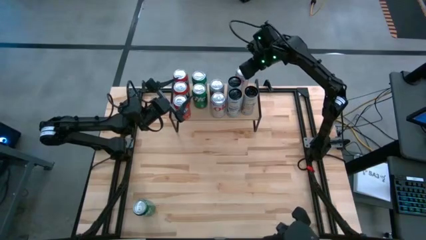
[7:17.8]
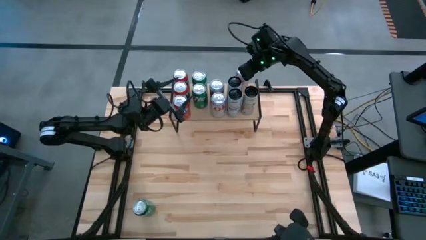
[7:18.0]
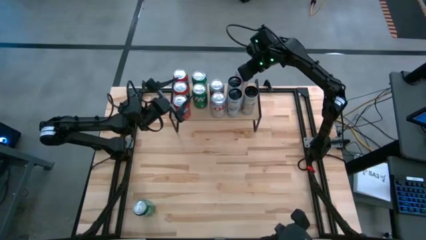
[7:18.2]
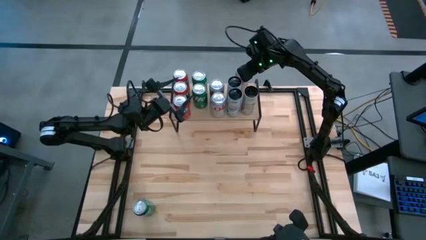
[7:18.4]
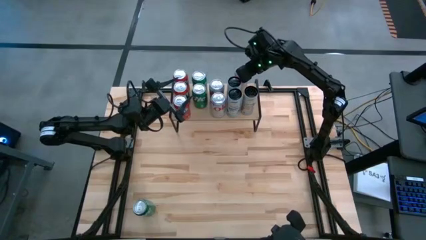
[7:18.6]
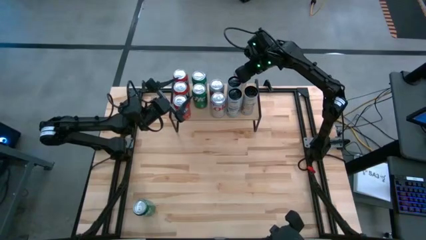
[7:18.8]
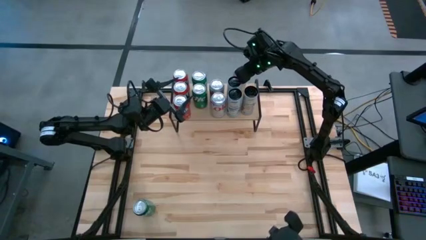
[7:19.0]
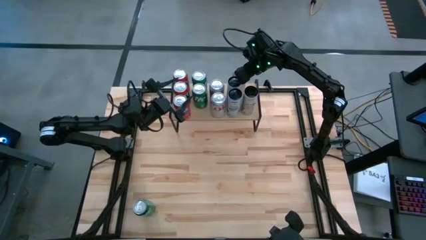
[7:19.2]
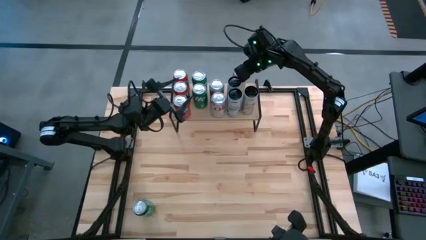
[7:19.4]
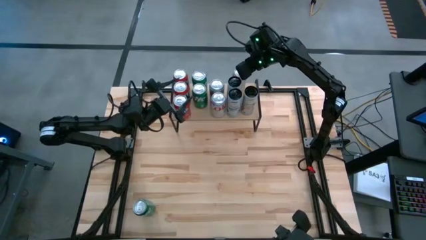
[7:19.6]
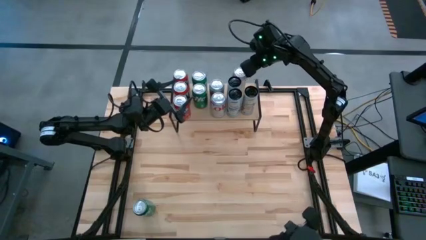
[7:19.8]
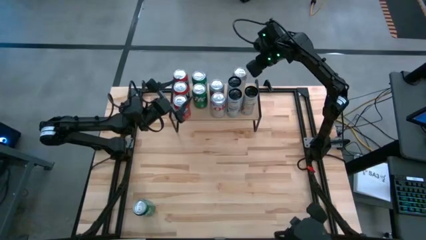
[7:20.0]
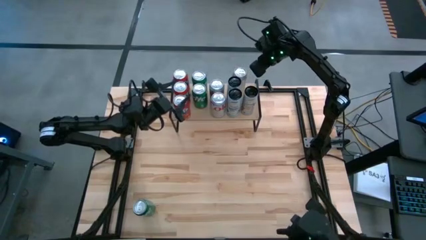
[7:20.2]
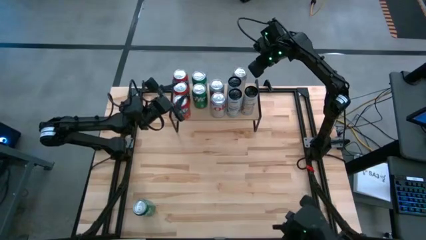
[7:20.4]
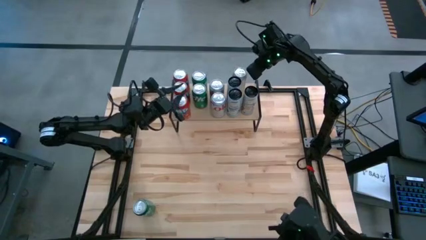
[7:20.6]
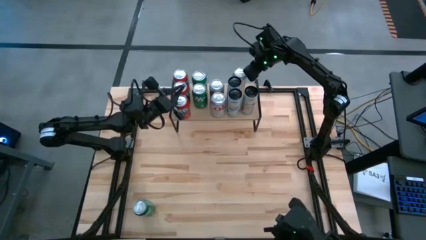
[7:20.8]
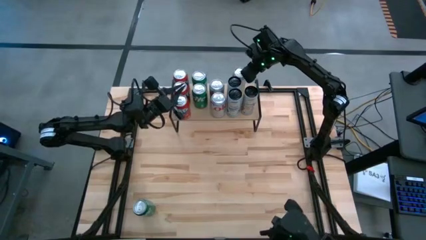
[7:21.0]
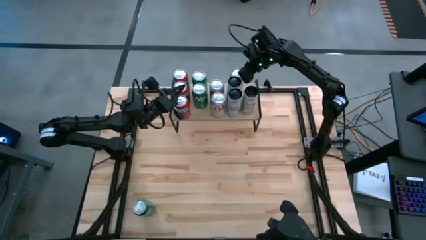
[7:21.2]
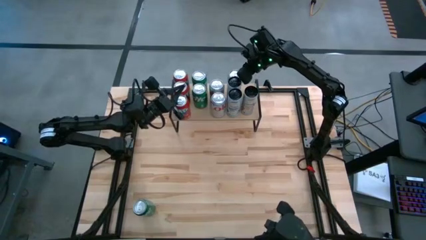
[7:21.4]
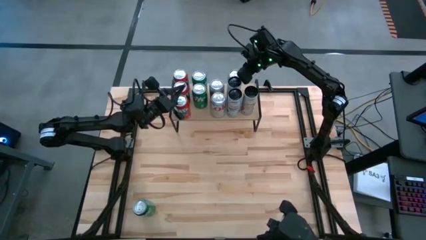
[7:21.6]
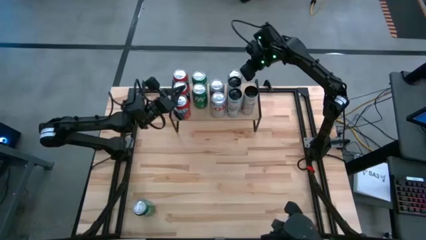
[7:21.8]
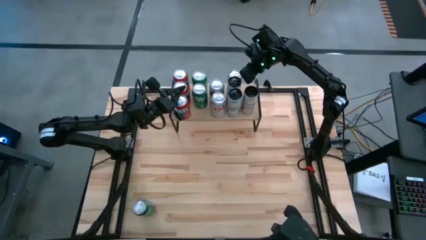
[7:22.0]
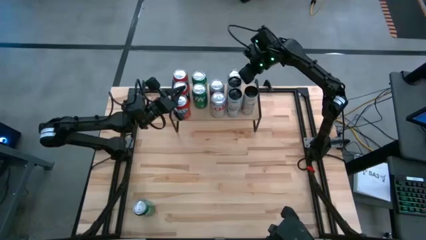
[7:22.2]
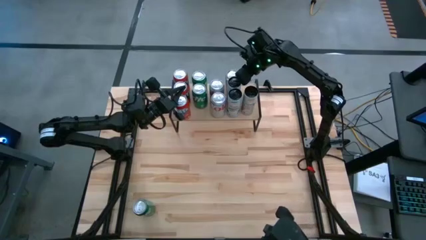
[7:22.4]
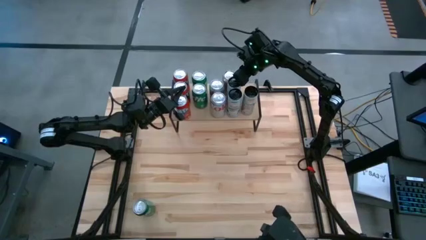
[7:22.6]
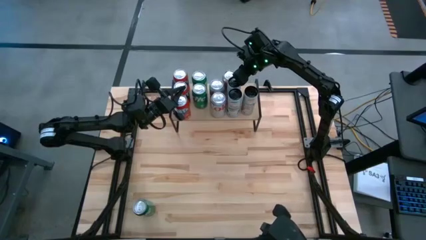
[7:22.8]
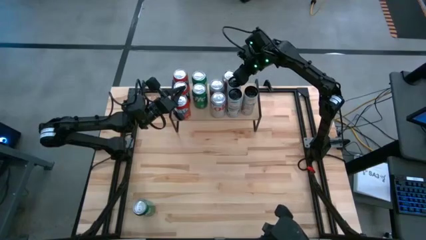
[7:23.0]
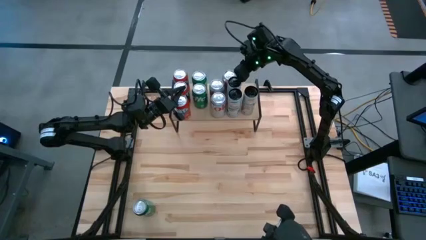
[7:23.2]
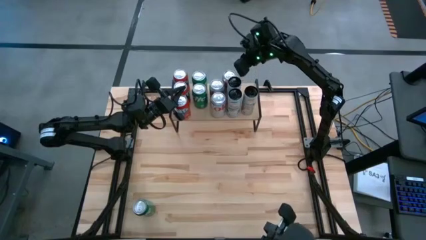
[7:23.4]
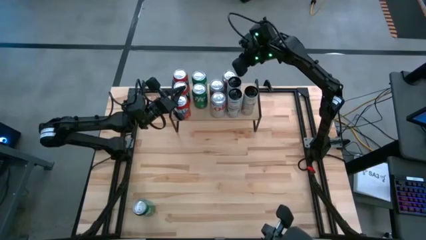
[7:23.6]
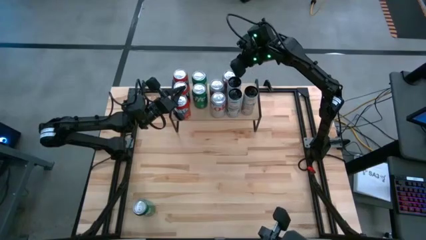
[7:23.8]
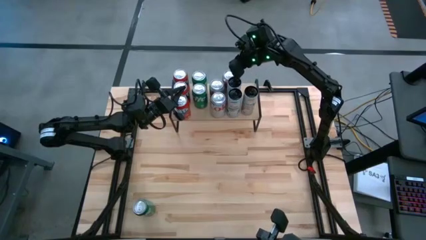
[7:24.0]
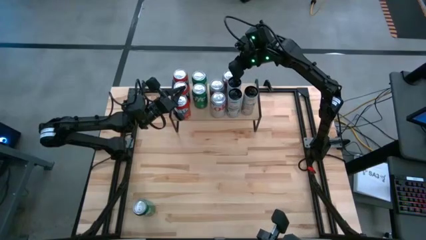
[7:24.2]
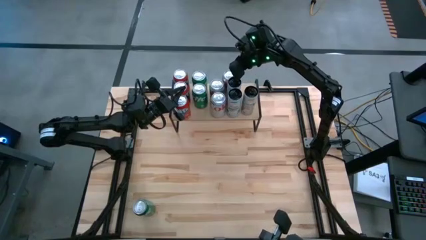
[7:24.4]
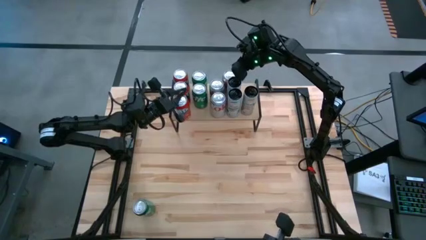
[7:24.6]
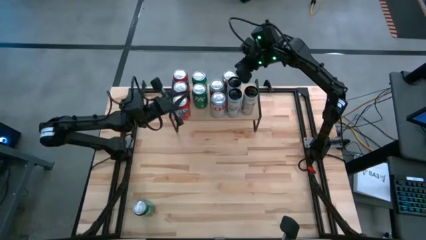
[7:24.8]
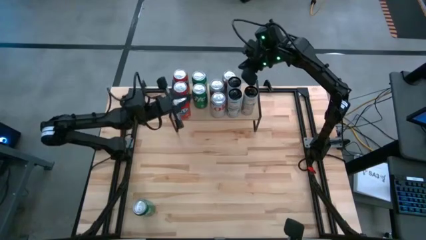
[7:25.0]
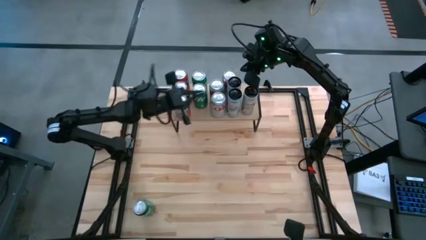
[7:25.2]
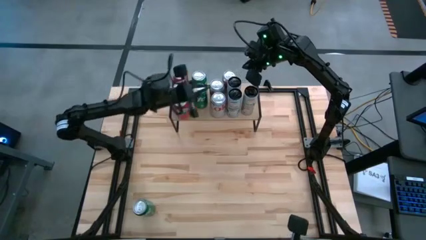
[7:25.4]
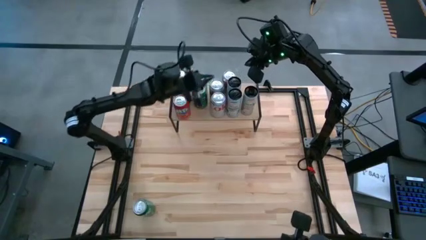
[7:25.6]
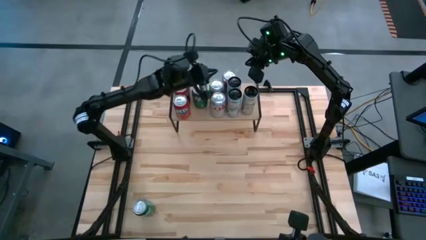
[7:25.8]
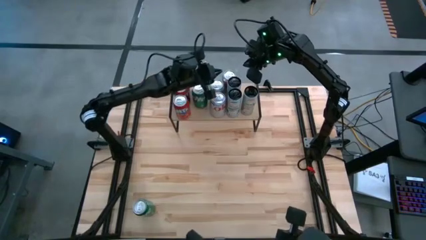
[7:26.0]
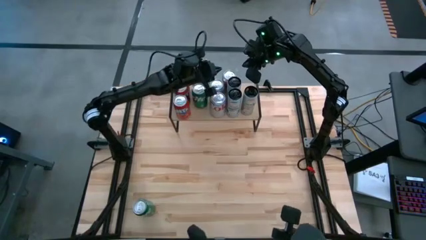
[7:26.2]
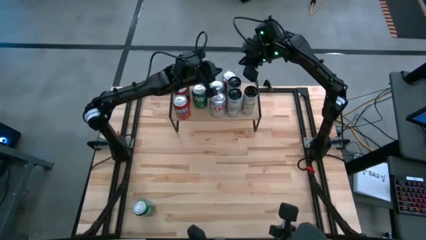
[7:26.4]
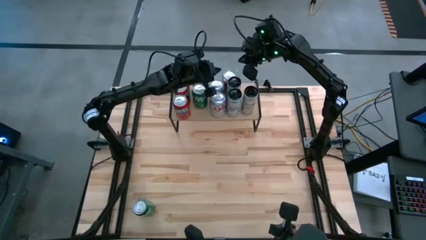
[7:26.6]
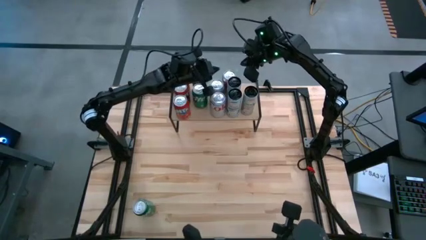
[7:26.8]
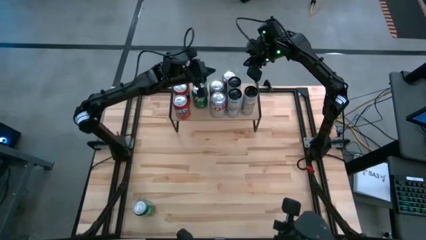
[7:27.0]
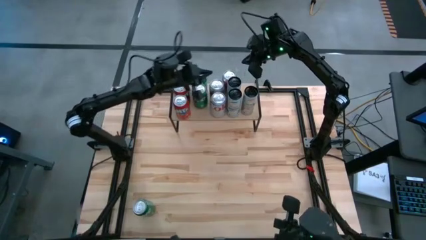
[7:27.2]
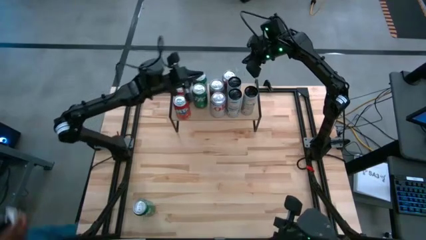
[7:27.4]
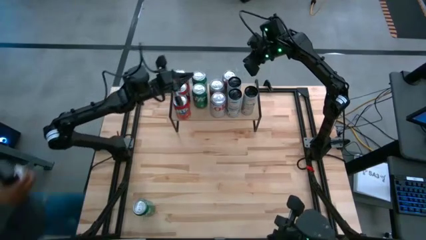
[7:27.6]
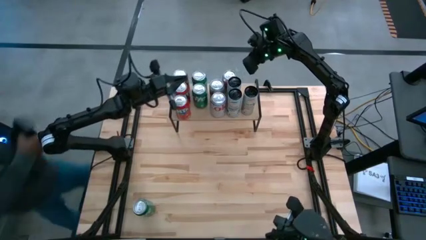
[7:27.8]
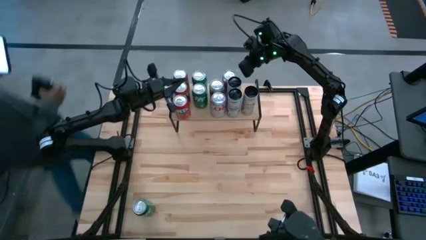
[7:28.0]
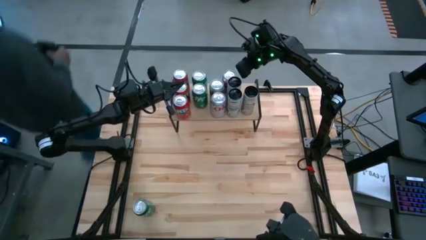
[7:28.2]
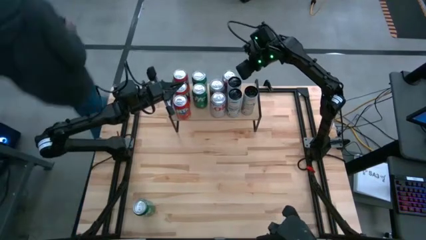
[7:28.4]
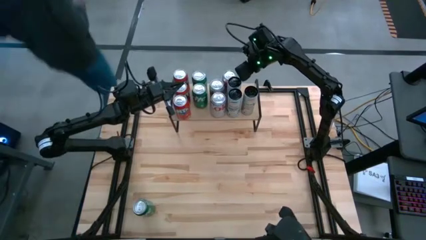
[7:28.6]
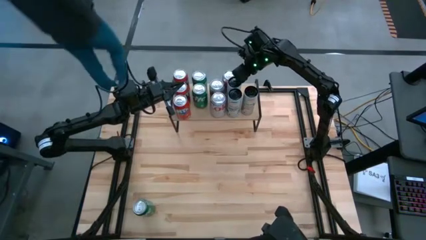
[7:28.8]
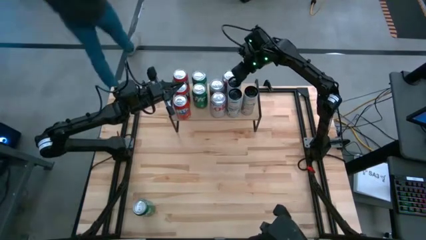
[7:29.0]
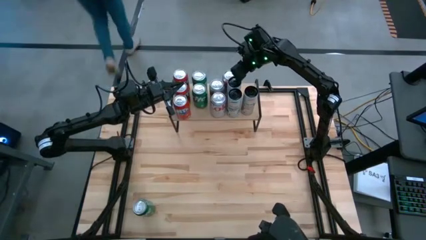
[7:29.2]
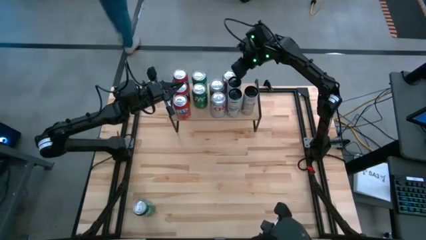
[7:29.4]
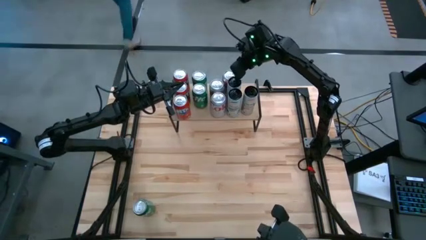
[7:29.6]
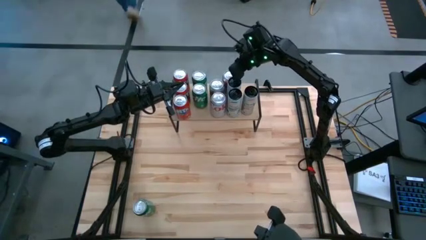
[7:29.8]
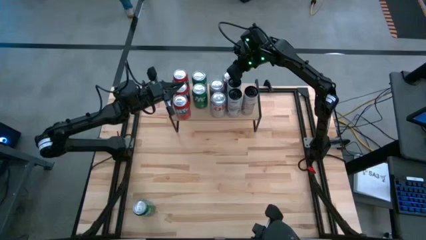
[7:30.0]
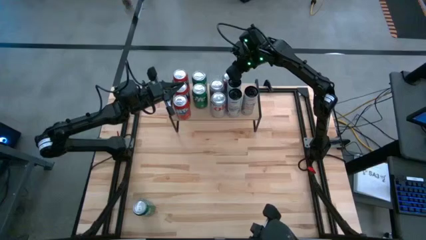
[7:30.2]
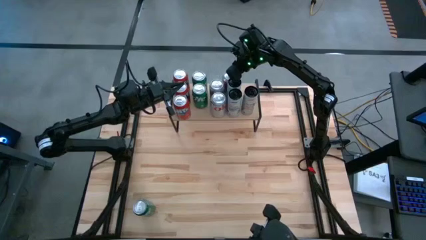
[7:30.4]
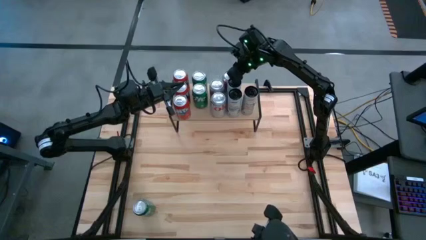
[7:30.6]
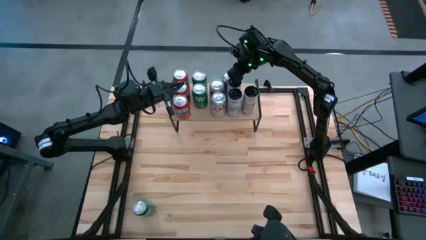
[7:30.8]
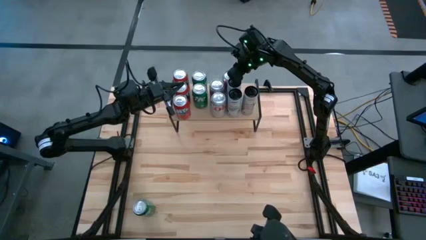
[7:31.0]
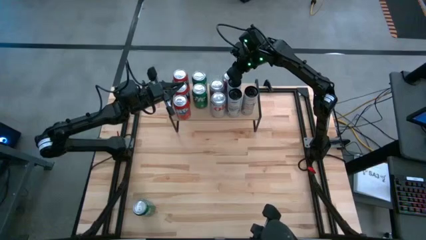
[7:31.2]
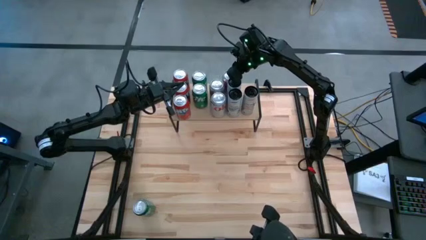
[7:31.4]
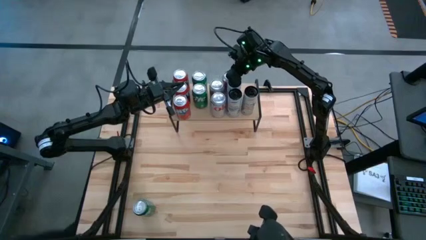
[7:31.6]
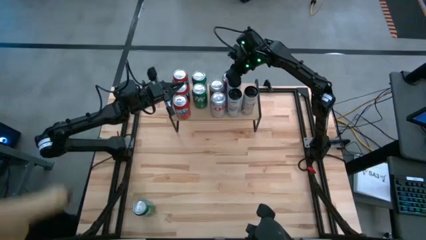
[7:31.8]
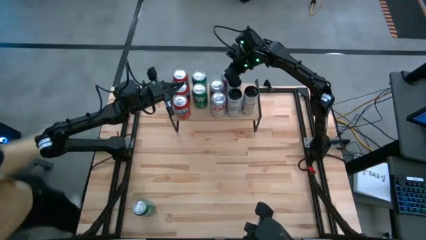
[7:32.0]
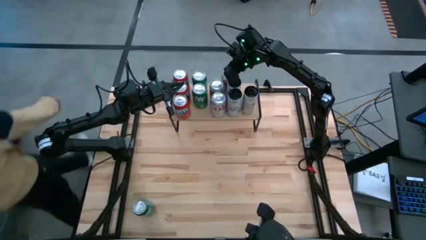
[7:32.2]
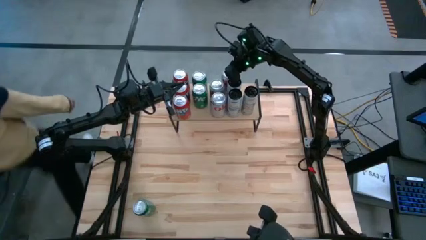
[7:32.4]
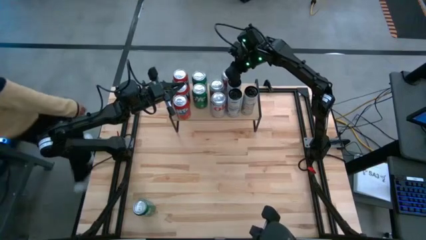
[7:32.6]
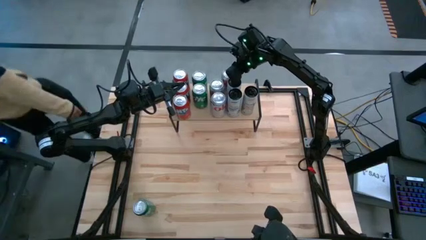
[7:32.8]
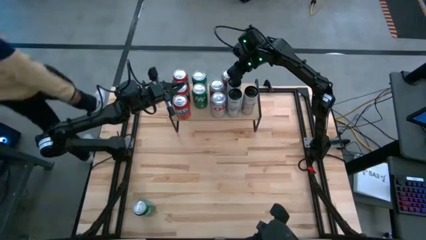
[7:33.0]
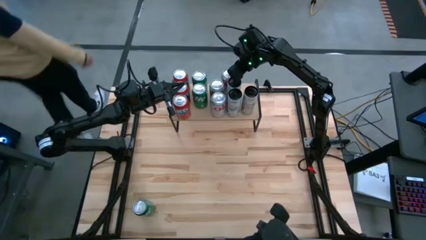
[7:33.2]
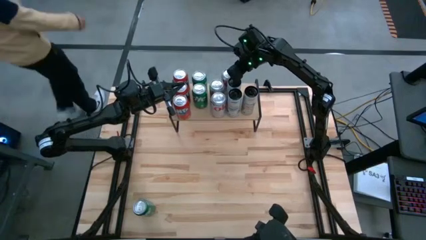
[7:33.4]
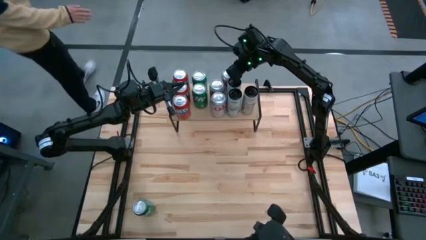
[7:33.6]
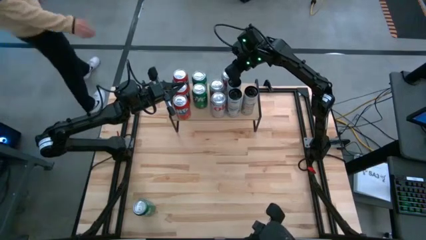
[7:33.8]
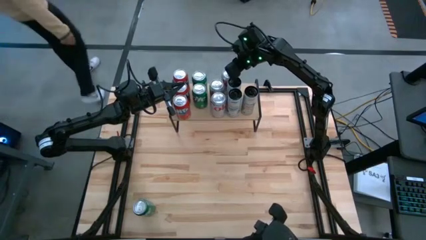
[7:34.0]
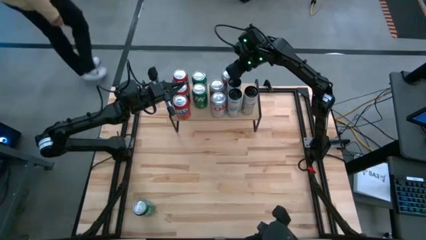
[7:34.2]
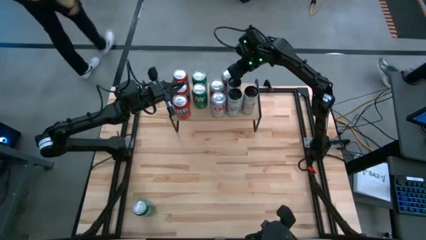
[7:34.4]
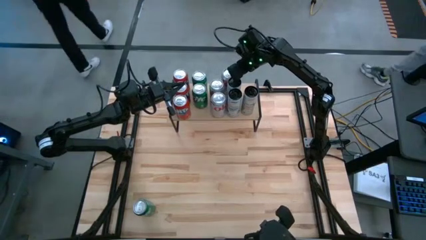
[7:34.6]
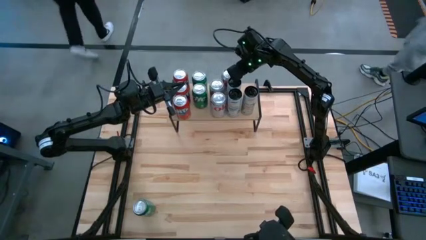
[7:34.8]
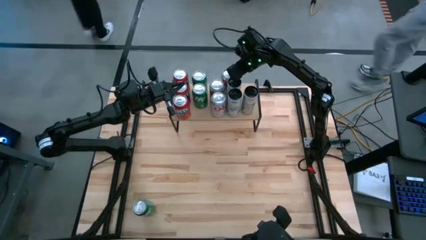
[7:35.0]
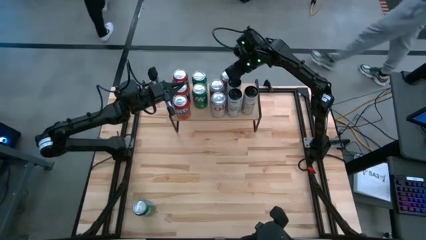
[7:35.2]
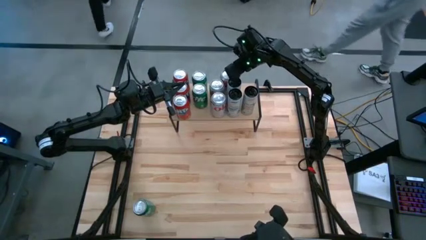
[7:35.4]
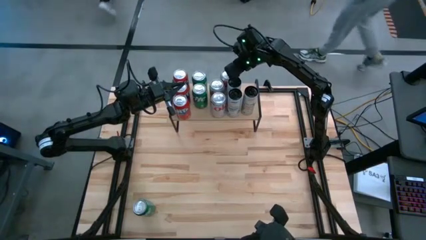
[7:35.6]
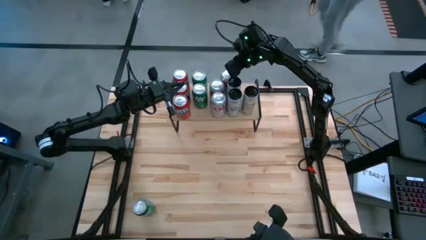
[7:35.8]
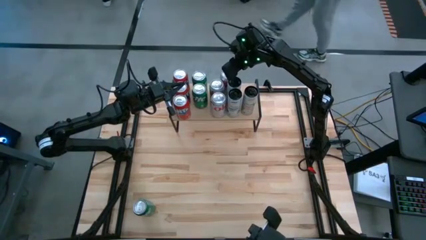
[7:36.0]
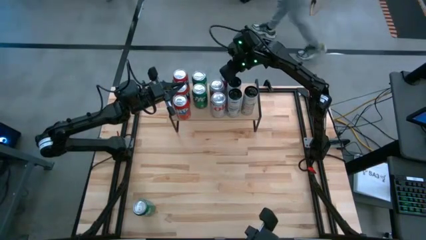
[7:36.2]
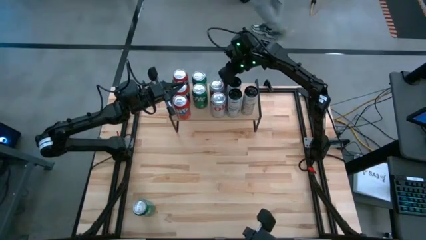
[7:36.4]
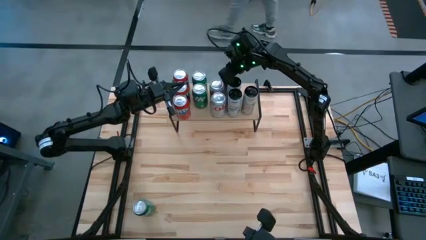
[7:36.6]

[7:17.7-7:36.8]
Task: Place canned beverage on shelf
Put the silver soda can on the shelf aligned with the other silver soda can
